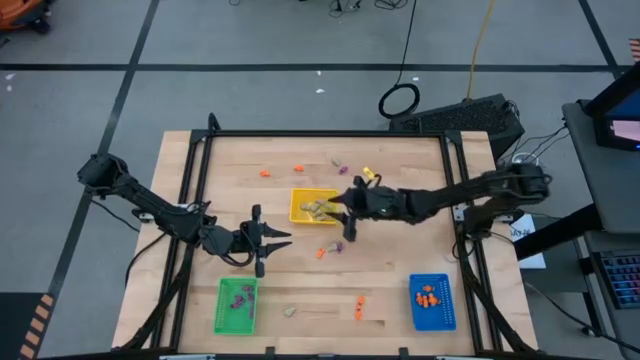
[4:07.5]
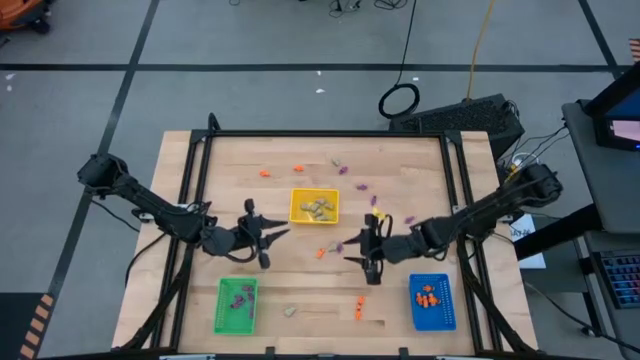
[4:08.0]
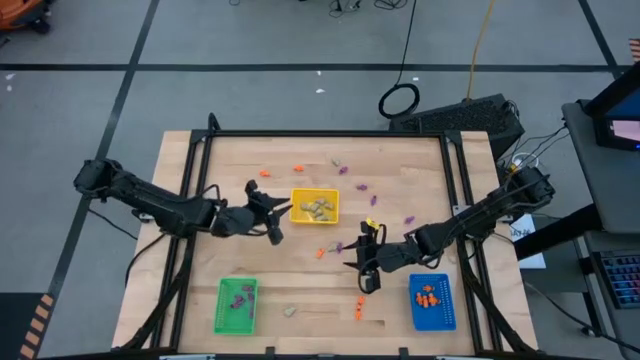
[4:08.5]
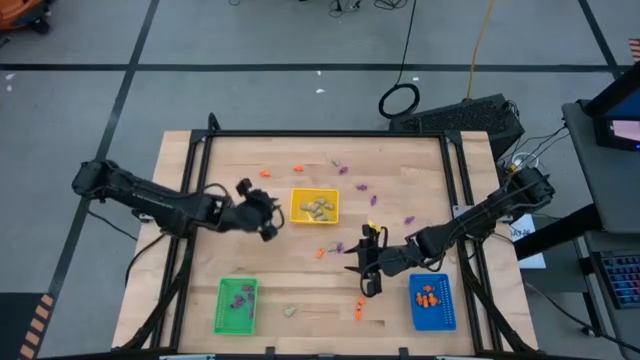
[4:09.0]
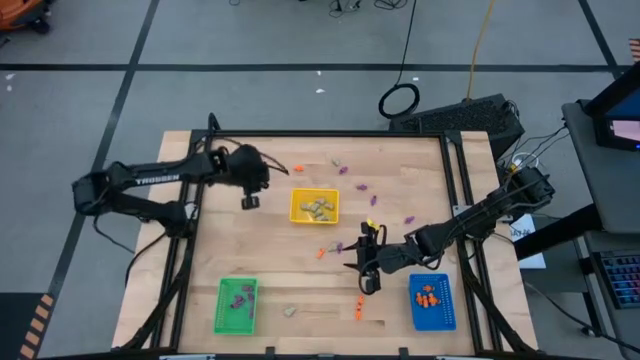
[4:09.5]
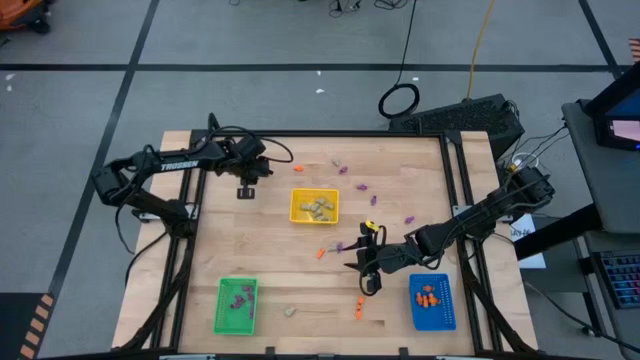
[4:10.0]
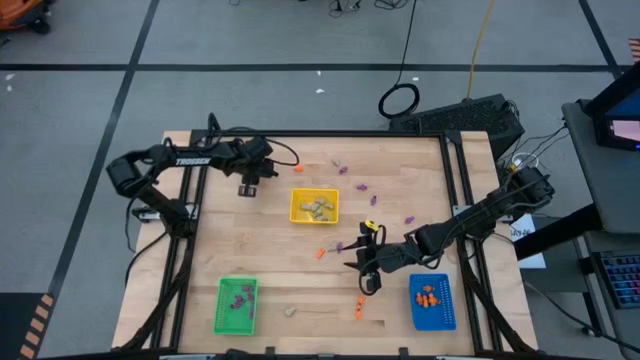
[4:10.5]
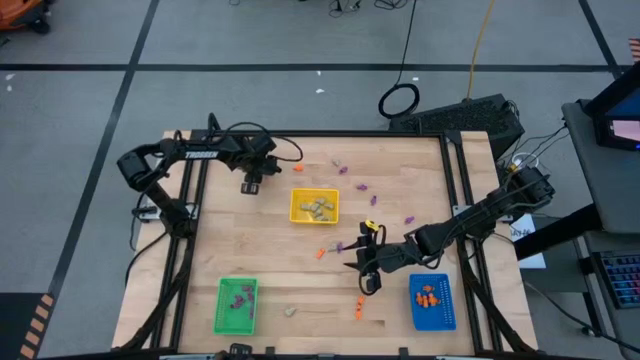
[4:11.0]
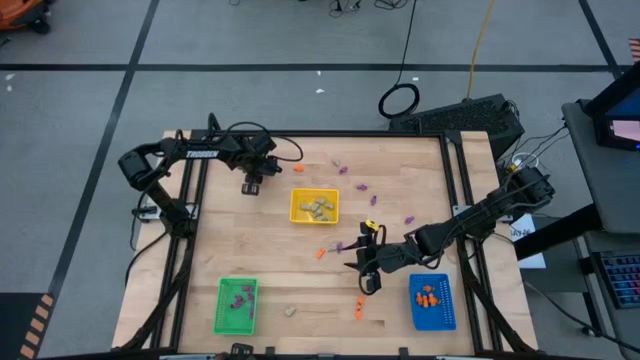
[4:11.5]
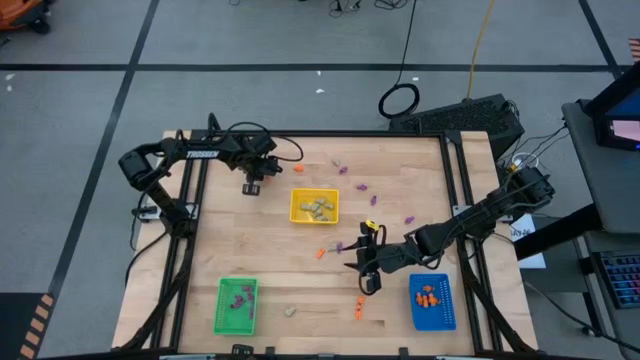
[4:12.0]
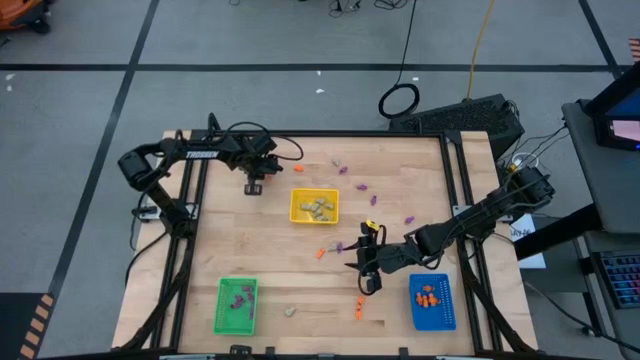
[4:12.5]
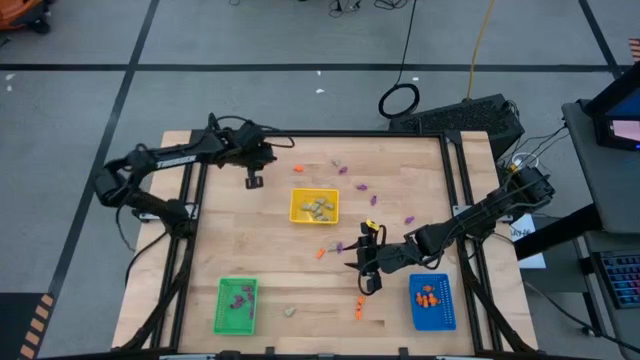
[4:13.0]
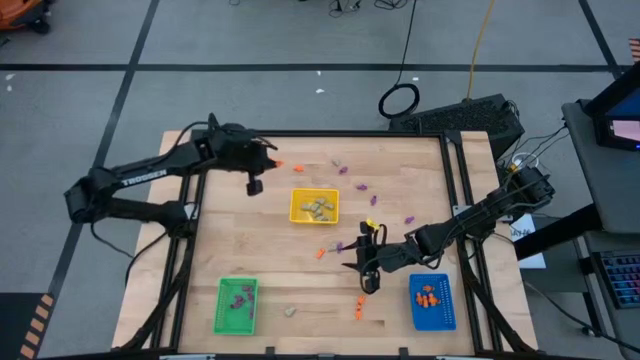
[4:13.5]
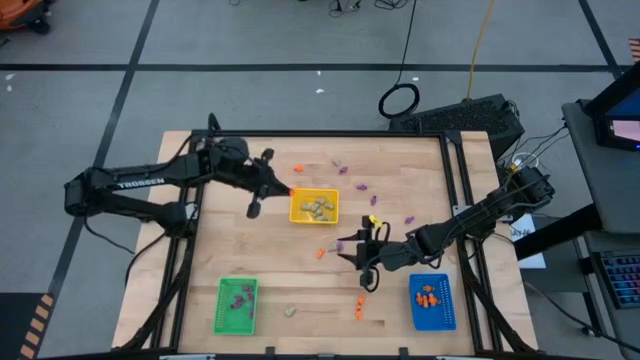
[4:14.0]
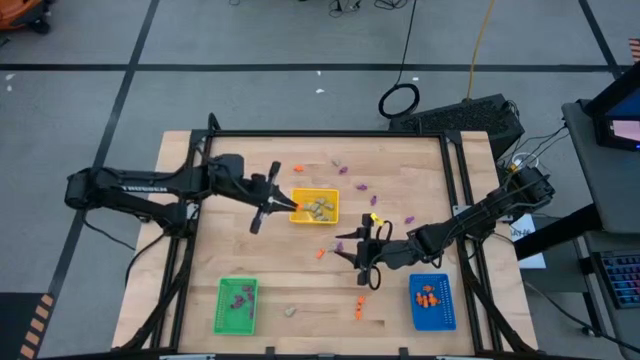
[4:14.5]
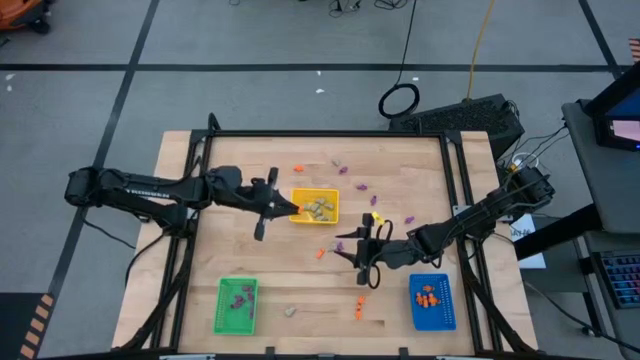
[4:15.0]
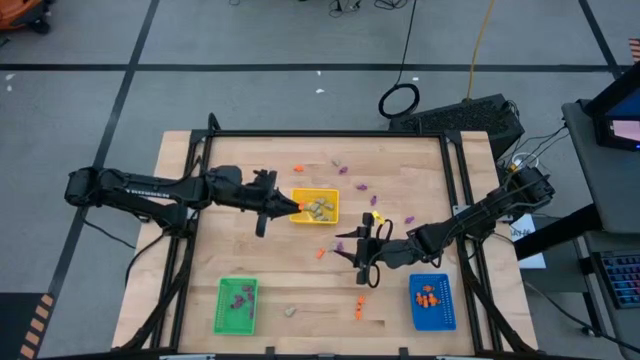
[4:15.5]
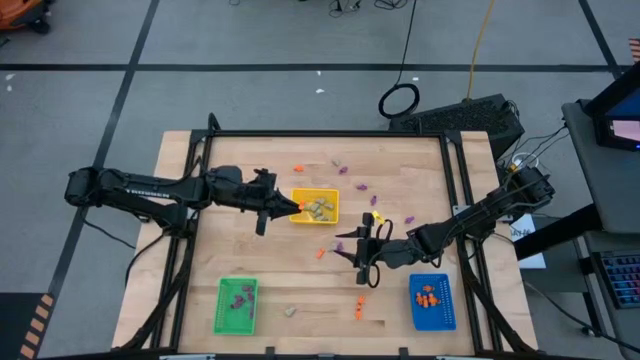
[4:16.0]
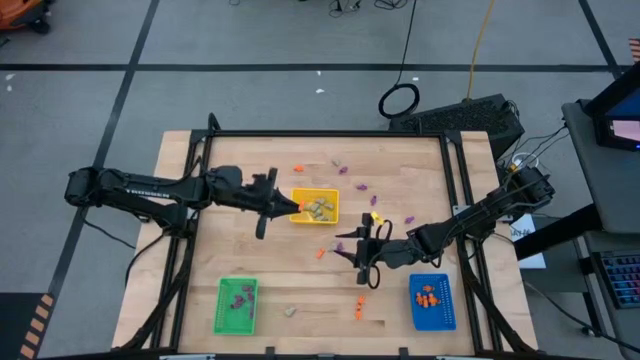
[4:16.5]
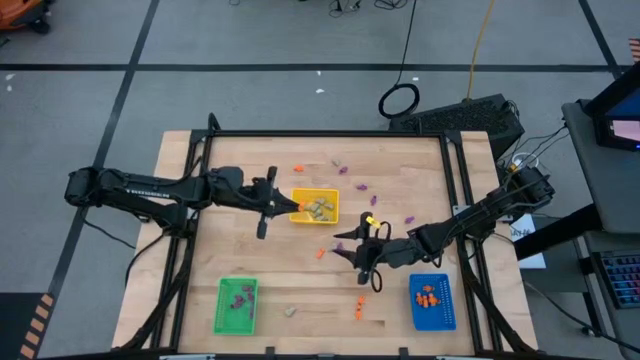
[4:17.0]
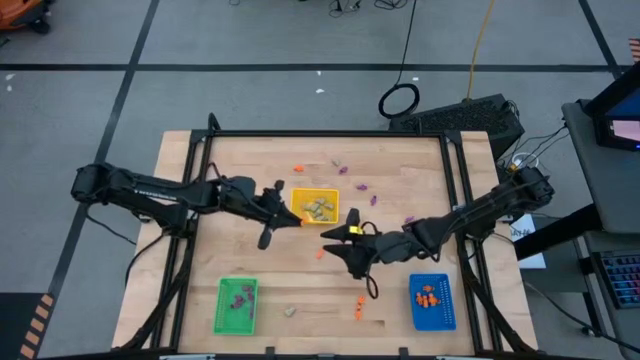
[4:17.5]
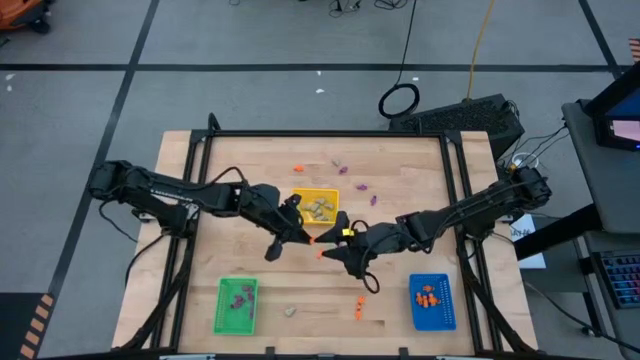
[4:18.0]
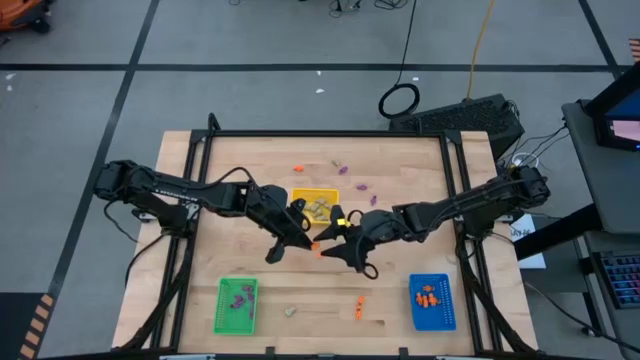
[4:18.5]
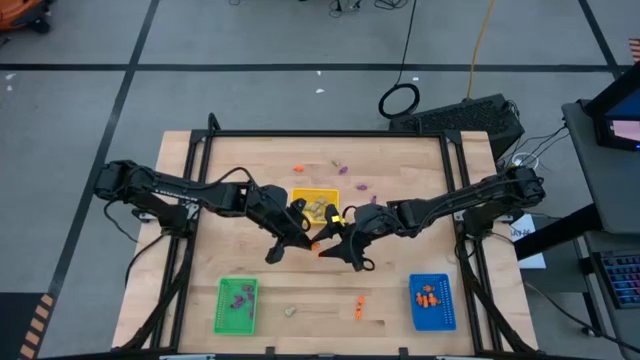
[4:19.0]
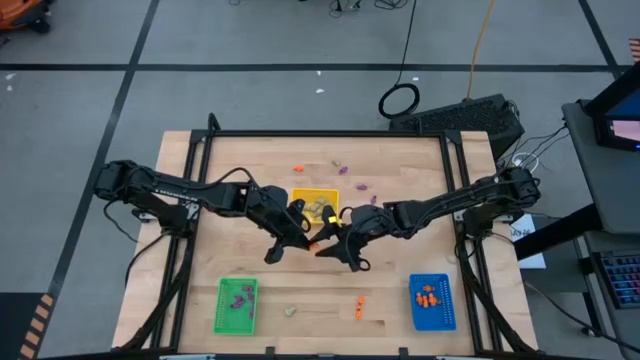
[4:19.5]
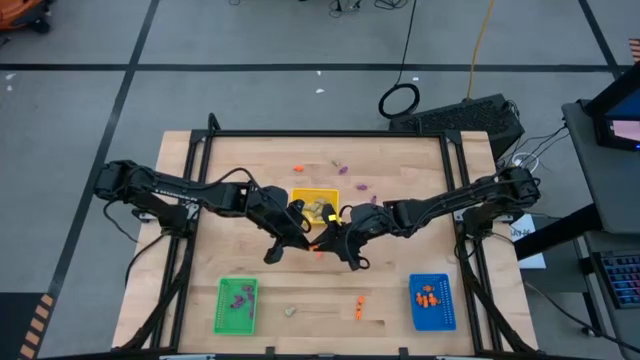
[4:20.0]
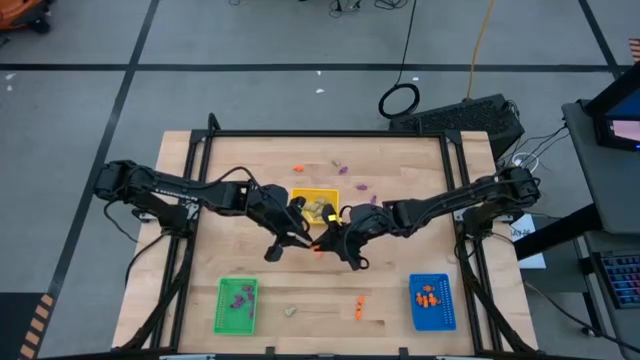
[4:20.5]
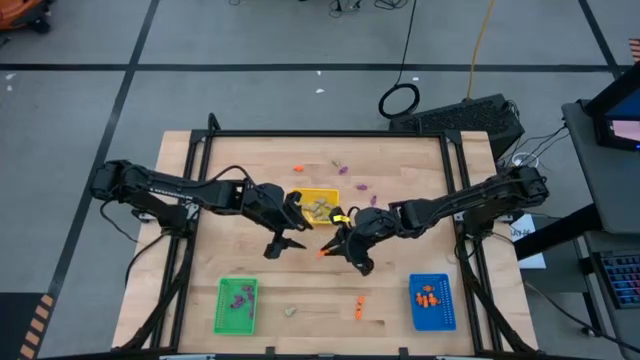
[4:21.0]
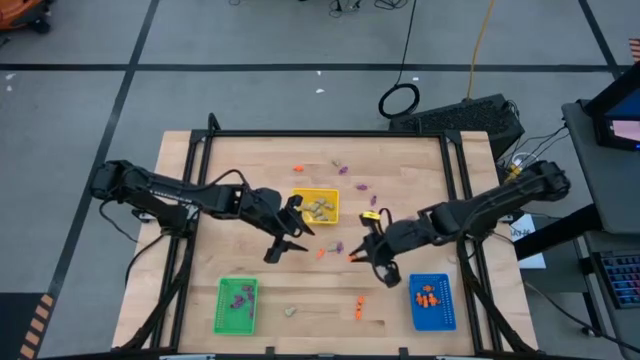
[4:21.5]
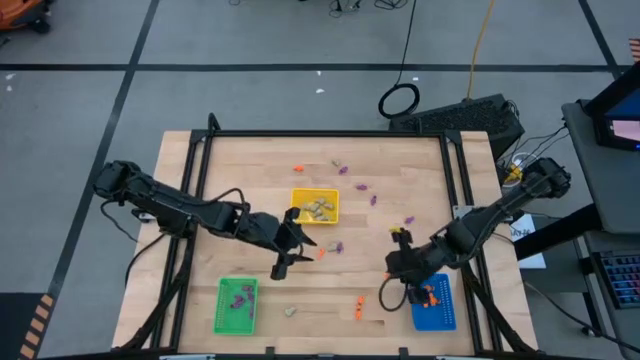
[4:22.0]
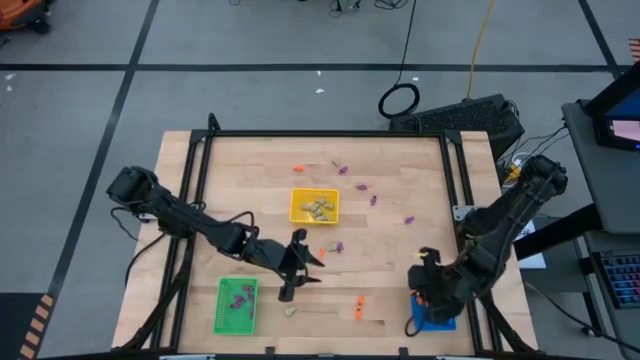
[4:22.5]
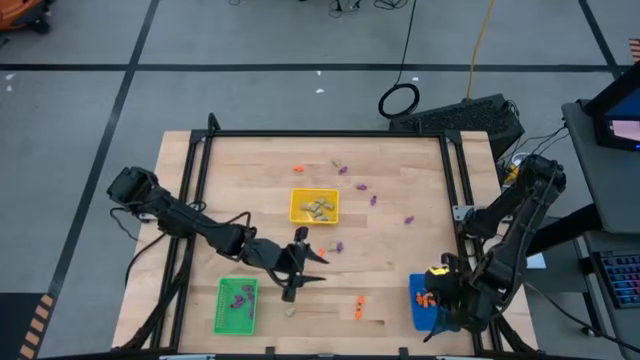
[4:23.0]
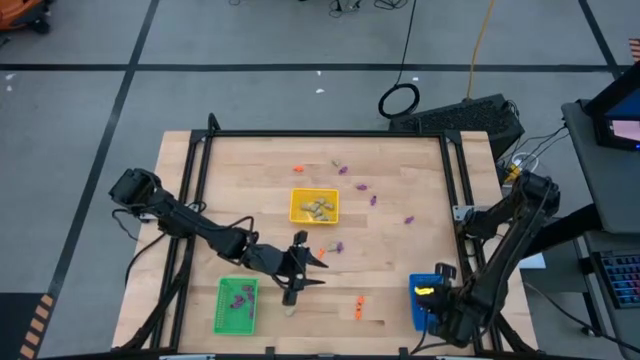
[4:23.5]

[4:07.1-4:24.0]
Task: Sort Halloween decoration
Put the orange skeleton toy in the blue basket

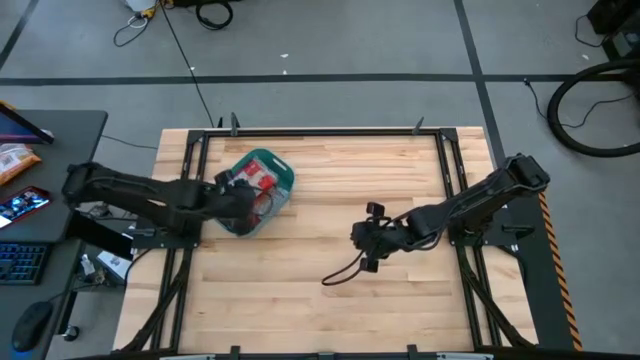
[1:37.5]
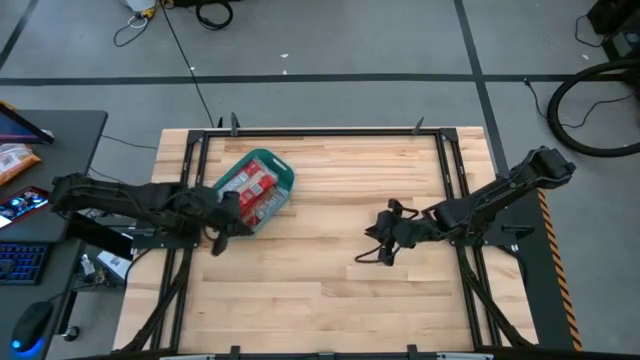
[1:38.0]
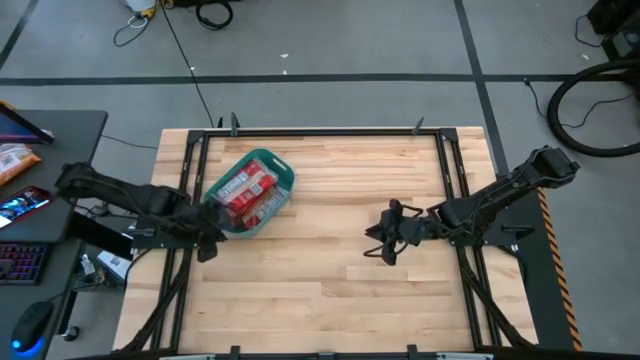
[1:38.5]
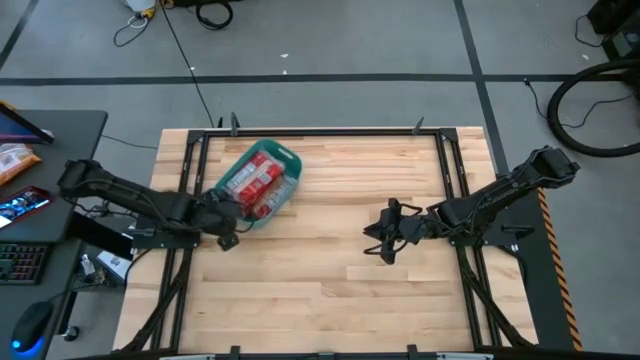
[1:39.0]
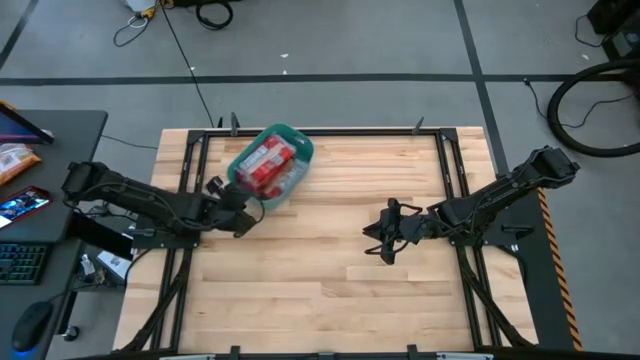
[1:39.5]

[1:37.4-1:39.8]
Task: Sort popcorn bags into baskets
Adjust the green bin

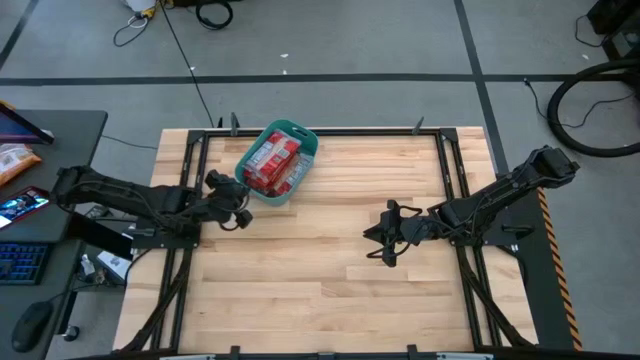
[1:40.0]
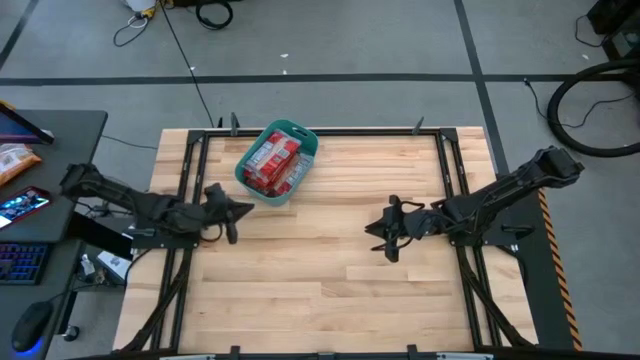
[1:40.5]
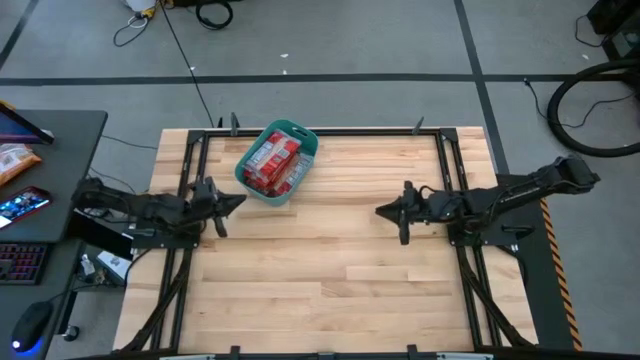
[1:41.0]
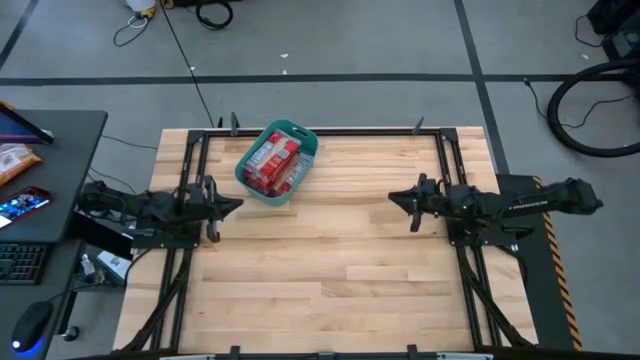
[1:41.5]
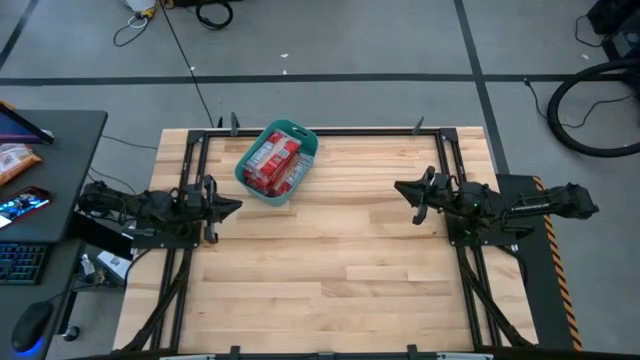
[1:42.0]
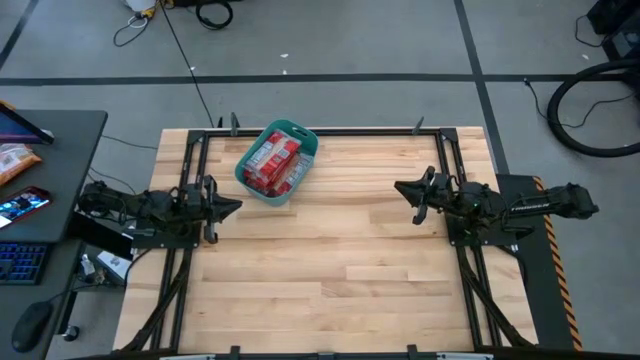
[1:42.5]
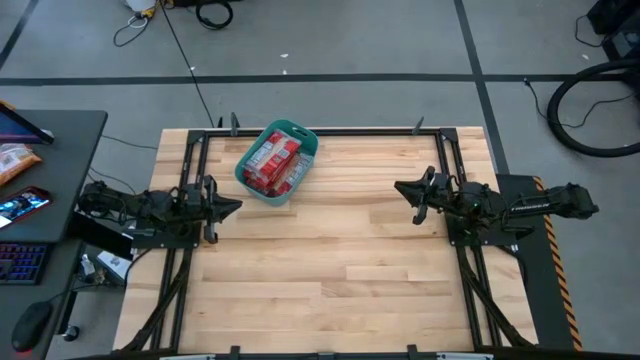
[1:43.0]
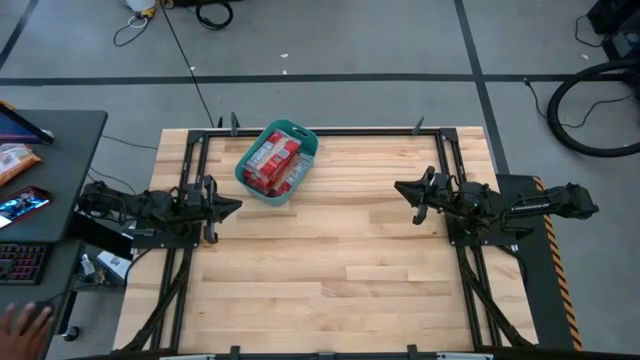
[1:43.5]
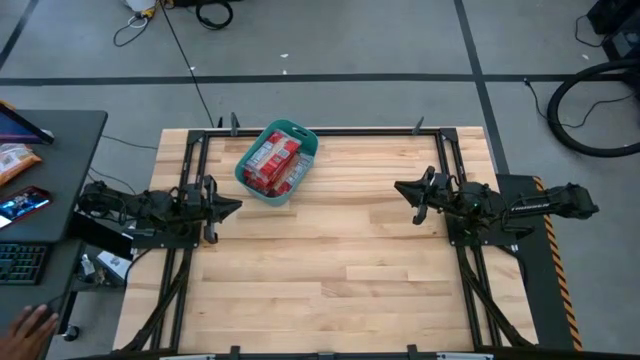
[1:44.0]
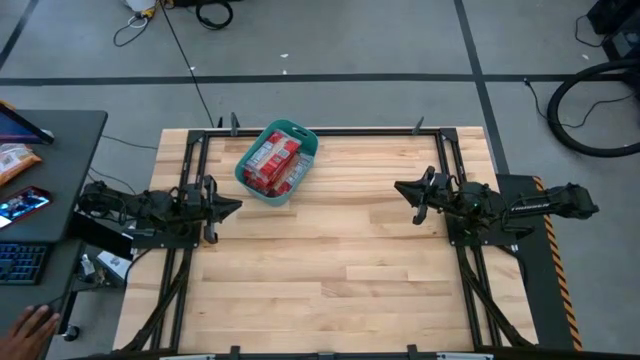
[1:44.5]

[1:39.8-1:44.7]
Return to Home Position
